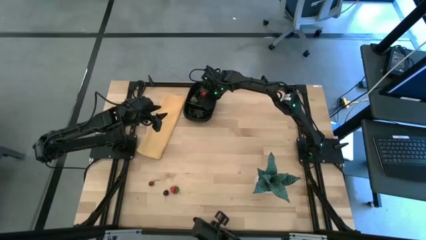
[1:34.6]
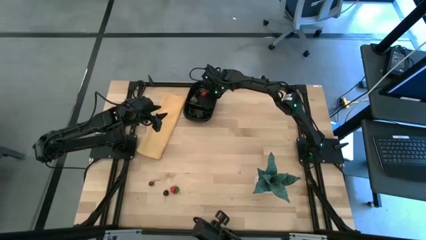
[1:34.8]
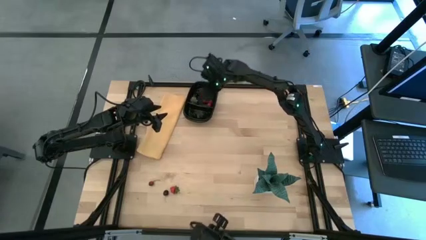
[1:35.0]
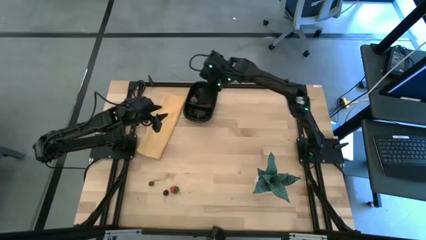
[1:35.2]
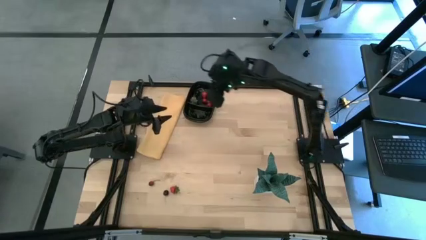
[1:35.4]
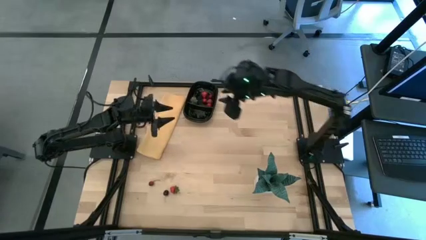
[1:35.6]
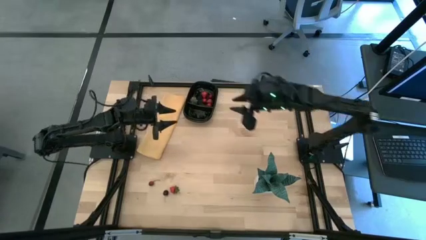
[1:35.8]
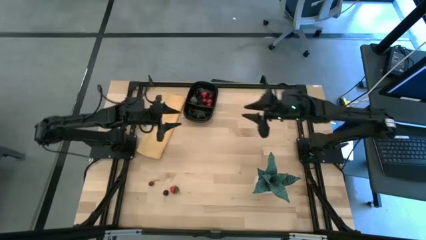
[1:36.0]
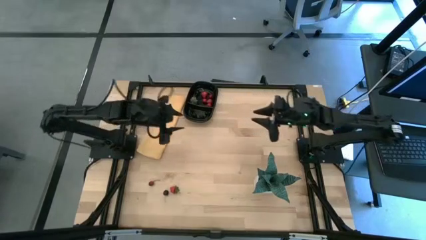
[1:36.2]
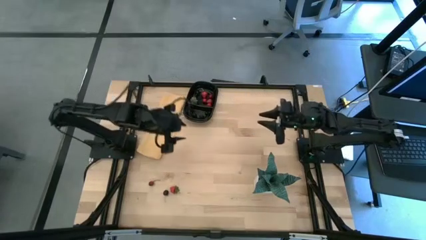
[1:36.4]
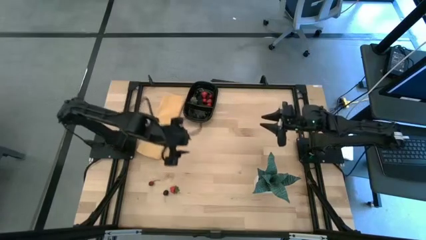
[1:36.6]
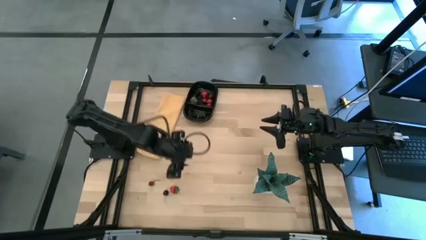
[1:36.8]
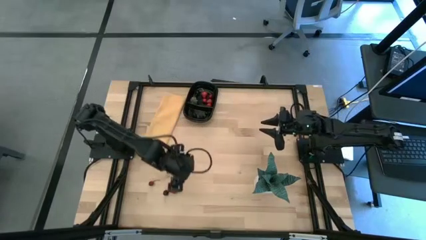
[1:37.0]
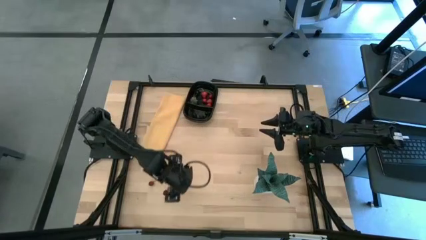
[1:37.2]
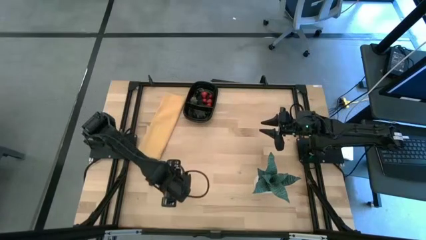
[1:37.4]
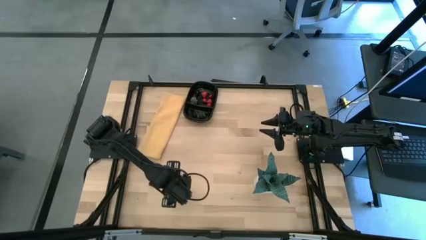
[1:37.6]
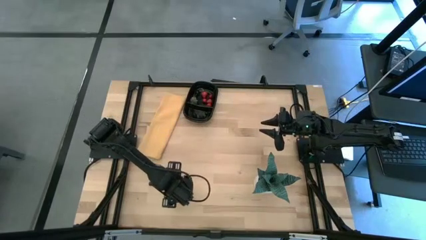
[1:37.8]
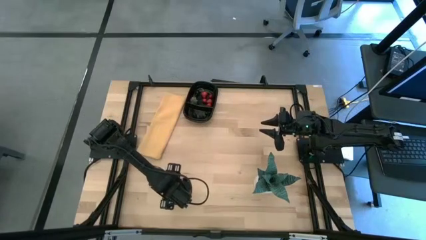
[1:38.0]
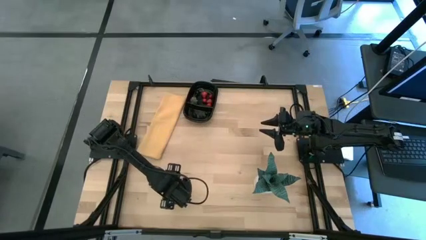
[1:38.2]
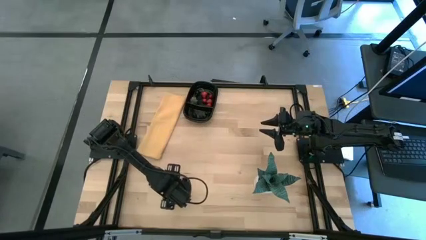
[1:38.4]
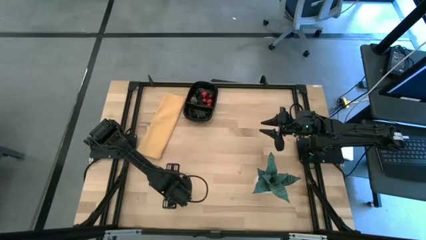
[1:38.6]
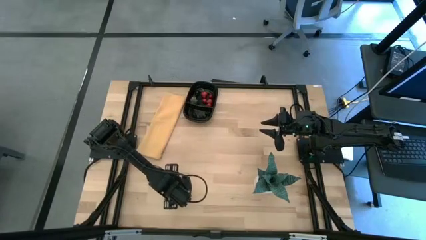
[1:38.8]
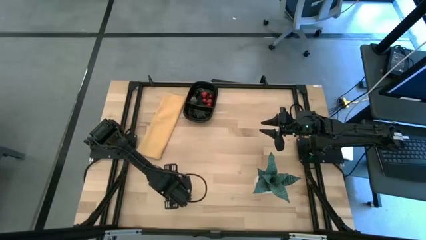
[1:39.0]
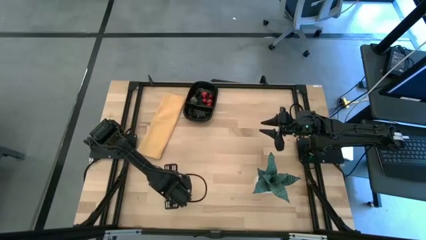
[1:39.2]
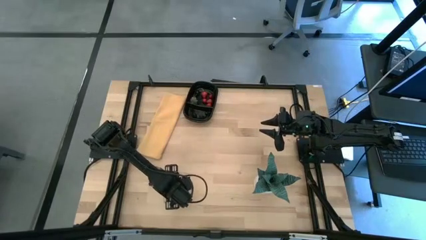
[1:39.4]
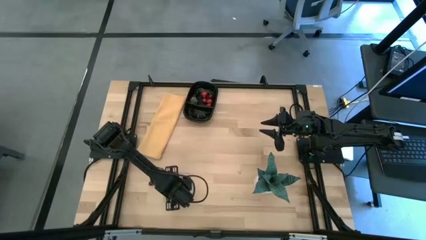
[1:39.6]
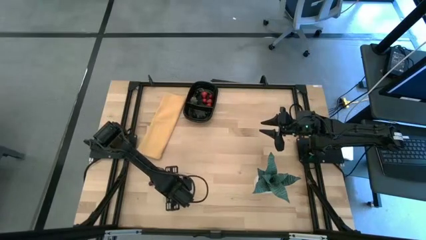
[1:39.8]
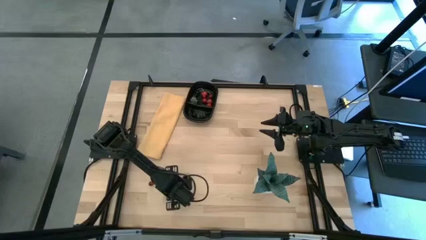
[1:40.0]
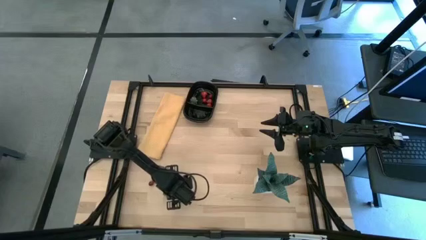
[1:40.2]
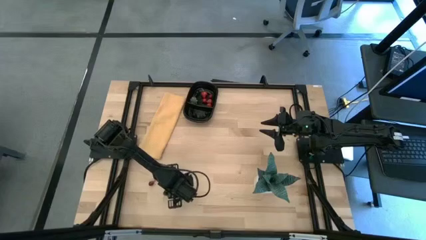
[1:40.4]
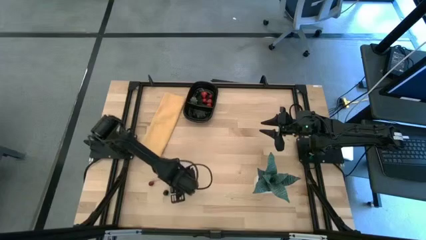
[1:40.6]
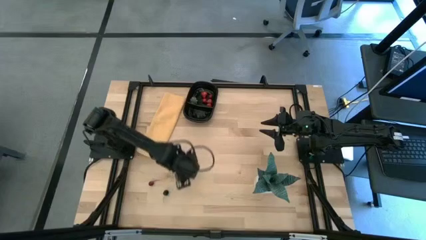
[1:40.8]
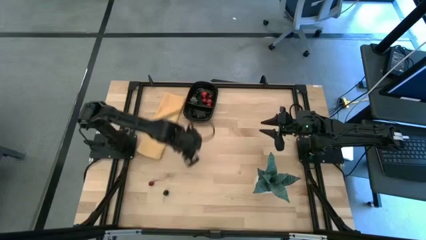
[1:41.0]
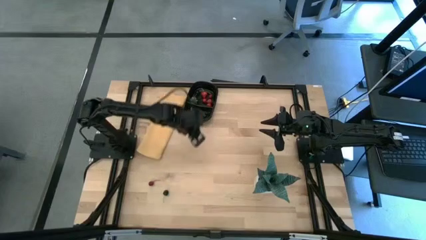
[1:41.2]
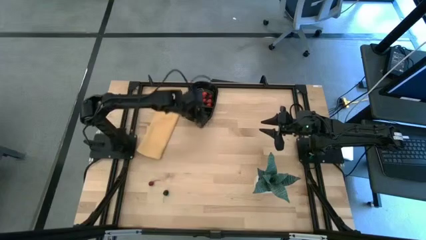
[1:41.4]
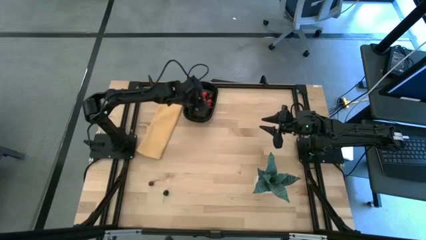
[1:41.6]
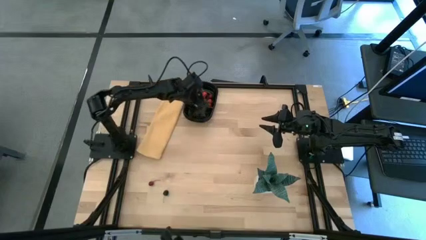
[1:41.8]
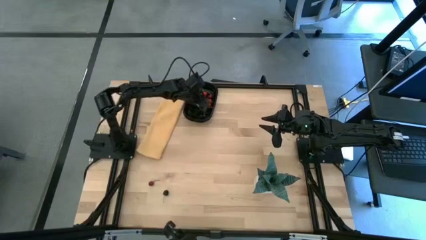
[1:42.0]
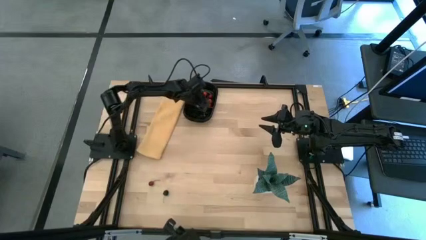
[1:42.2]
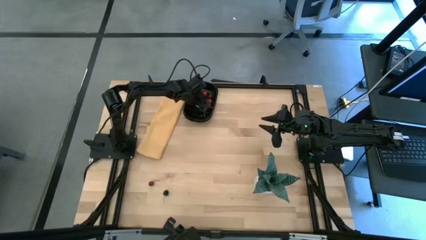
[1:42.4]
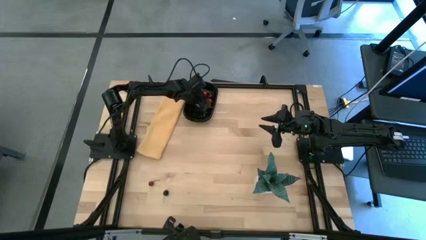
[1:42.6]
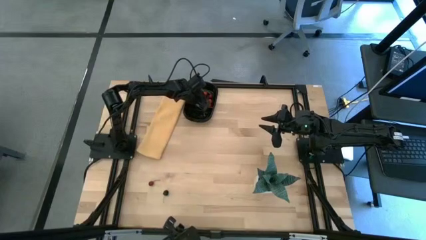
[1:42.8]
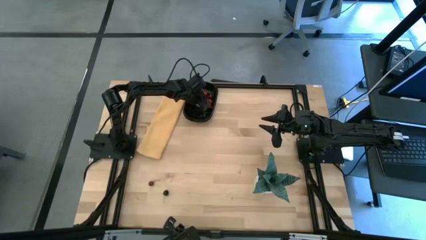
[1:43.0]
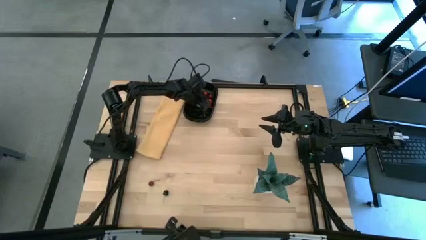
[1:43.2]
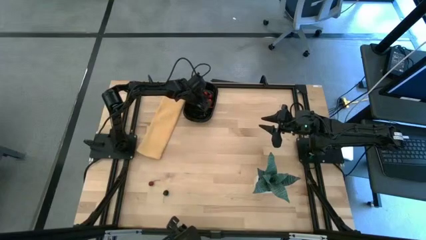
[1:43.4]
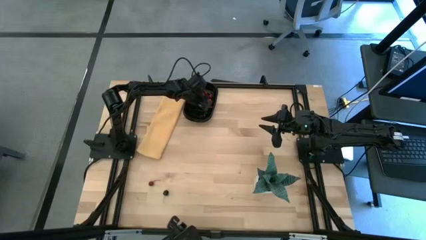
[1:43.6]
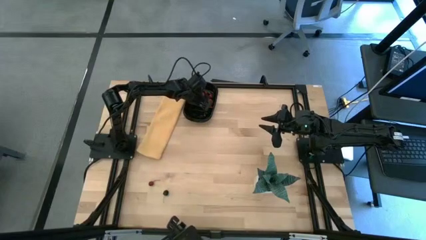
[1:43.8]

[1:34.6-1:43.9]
Task: Pick and placing Produce into tupperware
Put the red strawberry into the black bin

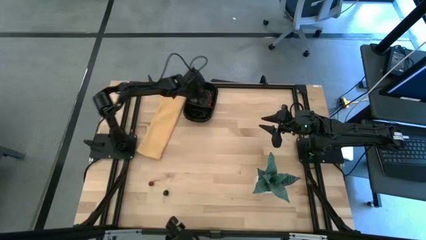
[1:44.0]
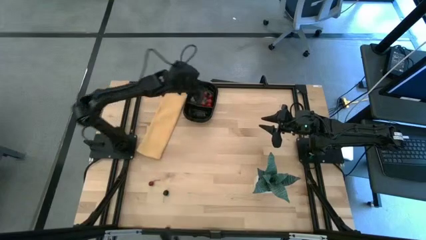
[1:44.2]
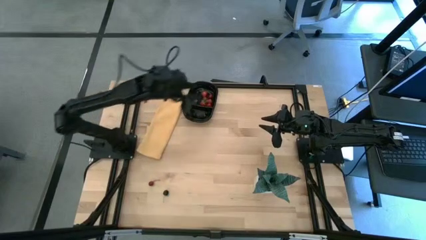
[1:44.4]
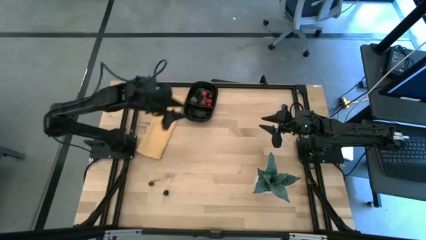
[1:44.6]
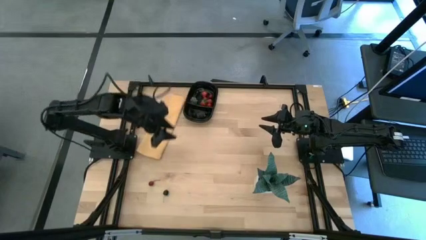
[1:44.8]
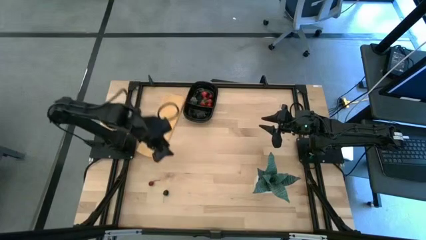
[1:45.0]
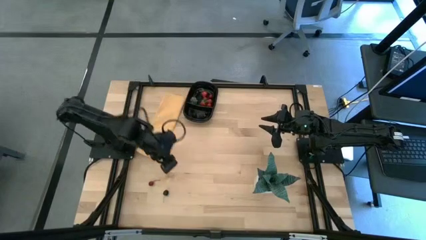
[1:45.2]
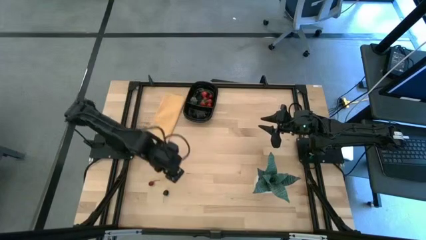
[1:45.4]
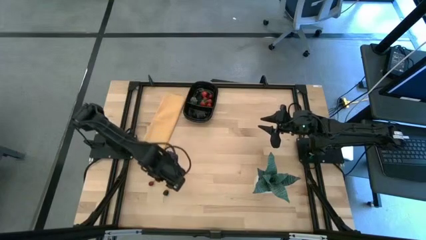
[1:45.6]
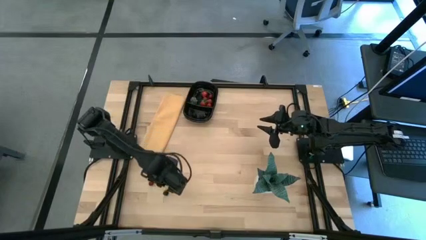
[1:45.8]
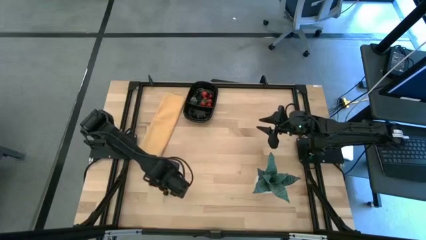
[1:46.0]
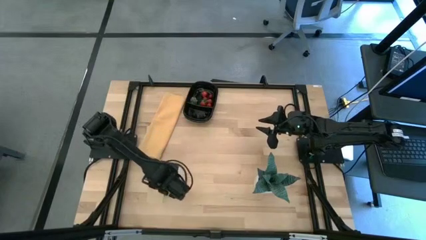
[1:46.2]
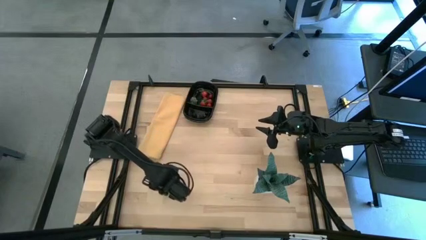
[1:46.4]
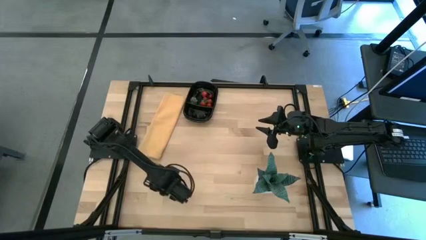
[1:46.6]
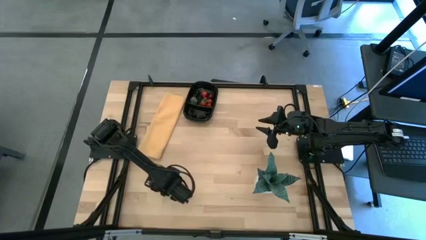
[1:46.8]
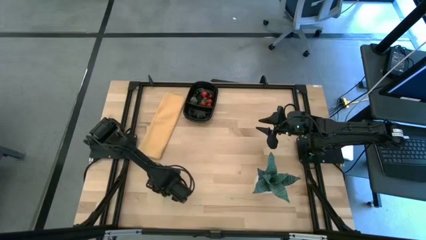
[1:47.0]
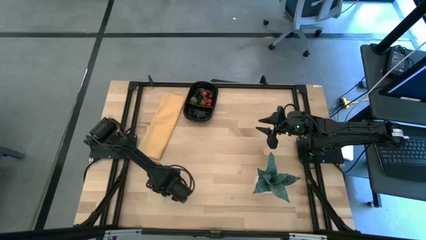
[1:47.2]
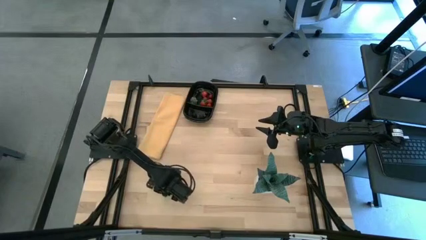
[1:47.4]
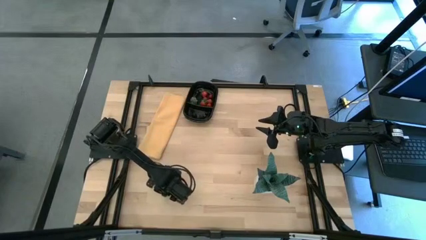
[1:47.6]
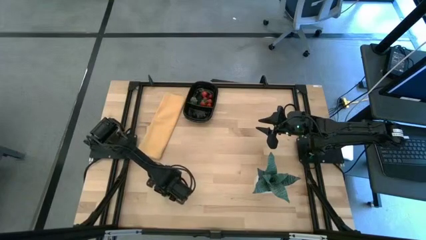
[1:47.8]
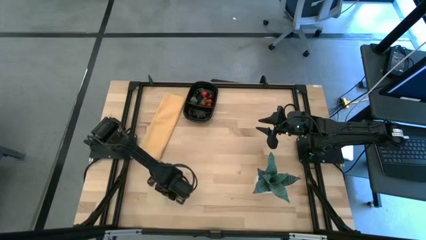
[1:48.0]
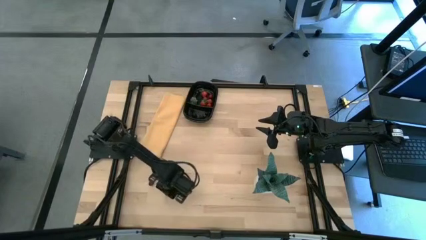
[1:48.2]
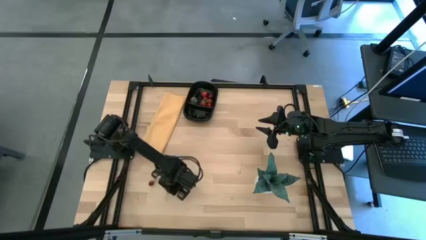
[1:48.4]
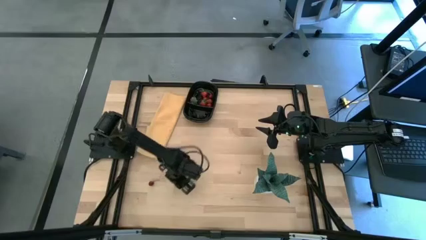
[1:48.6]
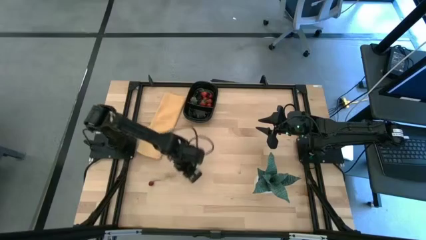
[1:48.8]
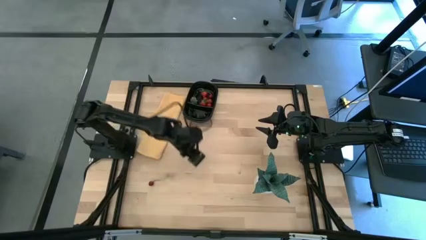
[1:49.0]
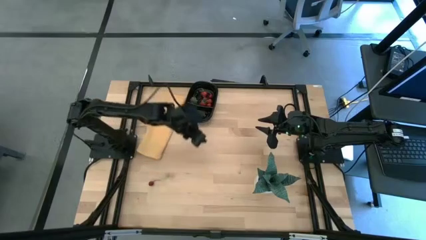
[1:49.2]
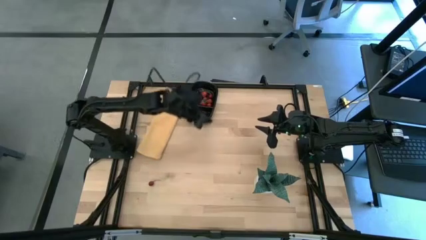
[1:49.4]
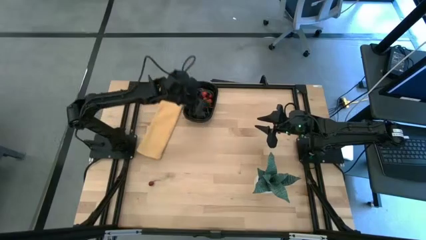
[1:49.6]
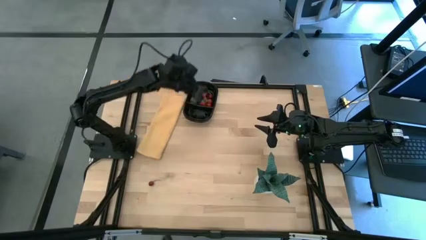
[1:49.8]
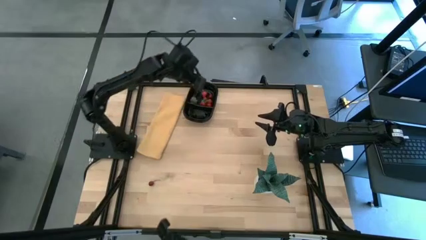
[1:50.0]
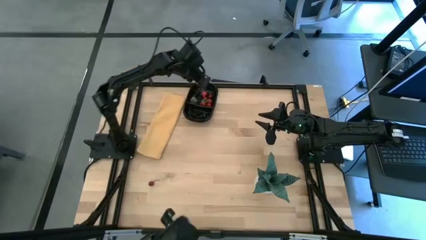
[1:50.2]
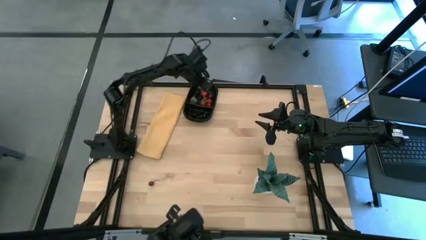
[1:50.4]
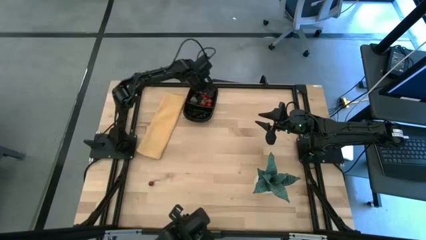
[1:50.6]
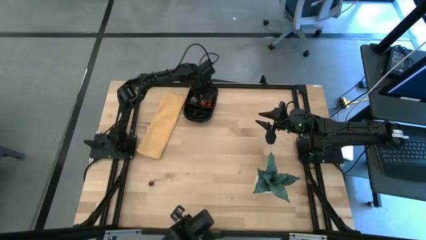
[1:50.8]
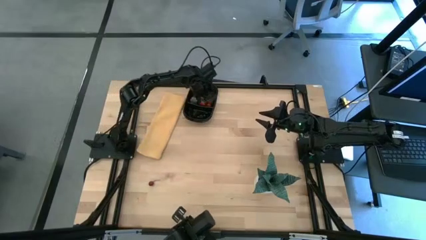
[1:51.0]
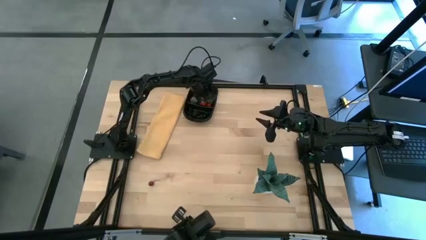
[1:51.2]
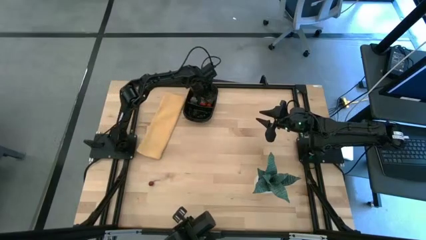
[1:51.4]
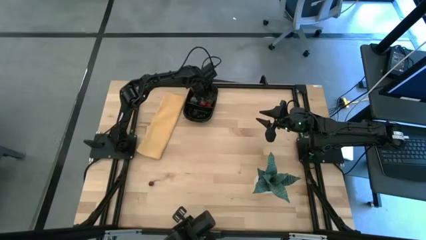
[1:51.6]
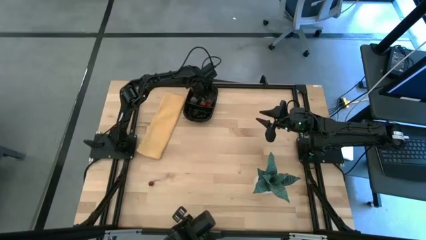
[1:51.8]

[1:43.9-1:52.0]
Put the black cherry into the black bin
